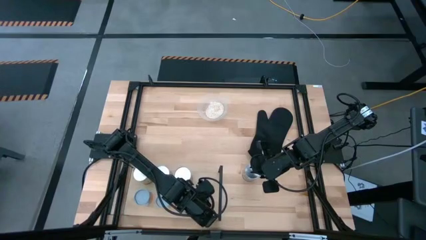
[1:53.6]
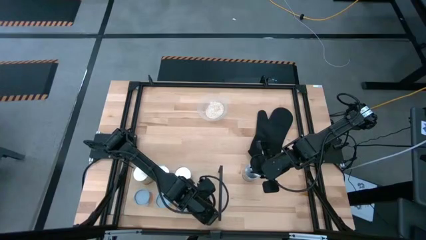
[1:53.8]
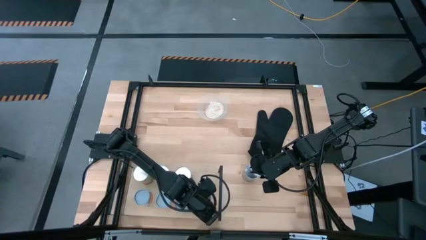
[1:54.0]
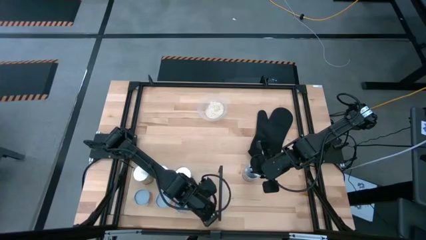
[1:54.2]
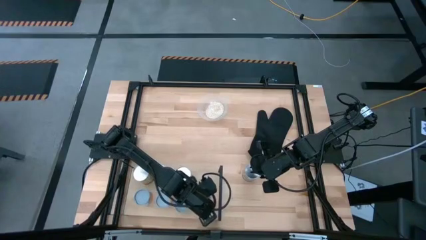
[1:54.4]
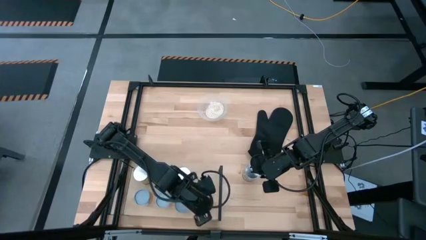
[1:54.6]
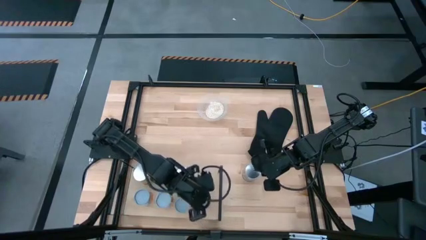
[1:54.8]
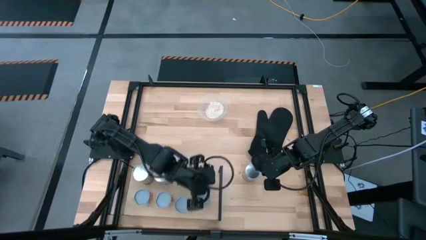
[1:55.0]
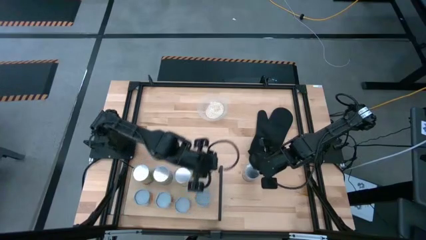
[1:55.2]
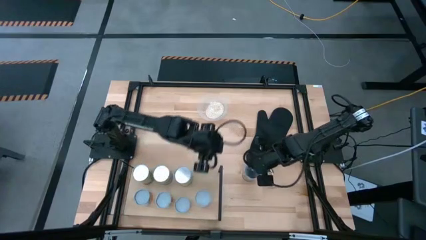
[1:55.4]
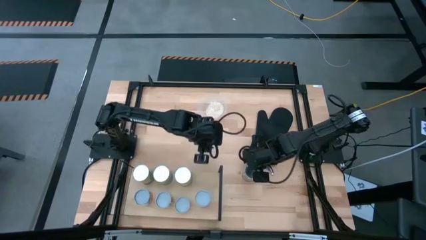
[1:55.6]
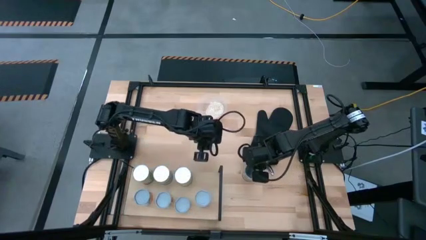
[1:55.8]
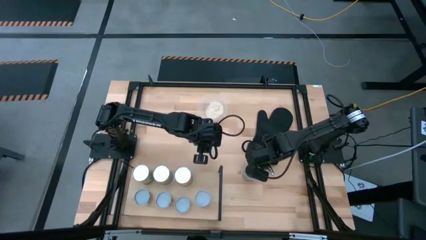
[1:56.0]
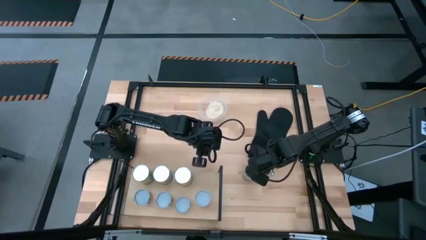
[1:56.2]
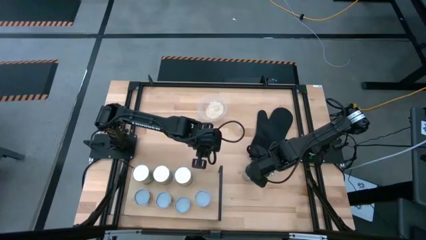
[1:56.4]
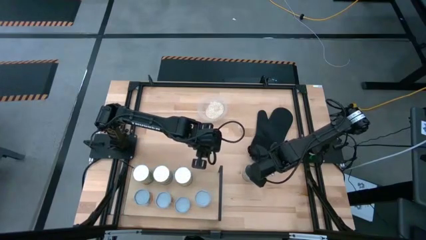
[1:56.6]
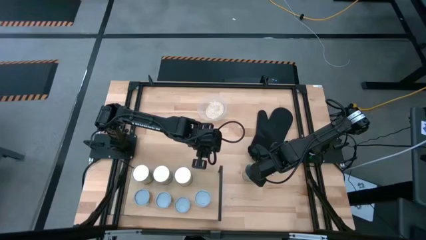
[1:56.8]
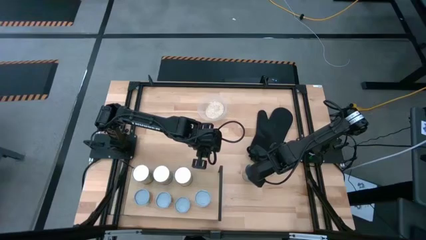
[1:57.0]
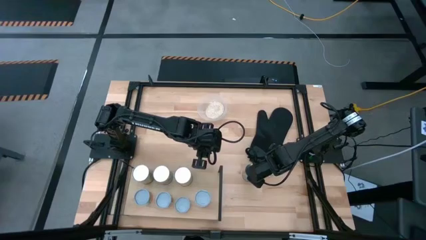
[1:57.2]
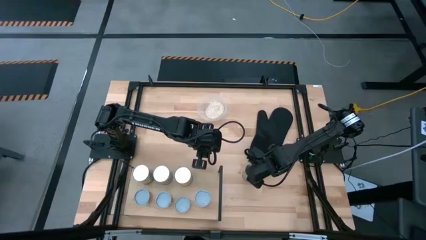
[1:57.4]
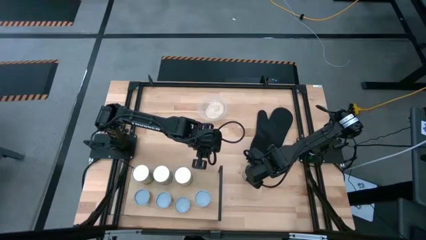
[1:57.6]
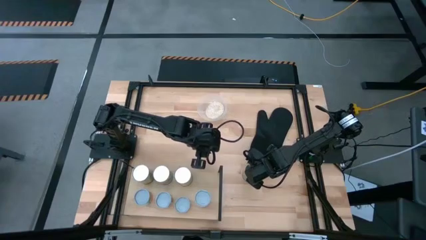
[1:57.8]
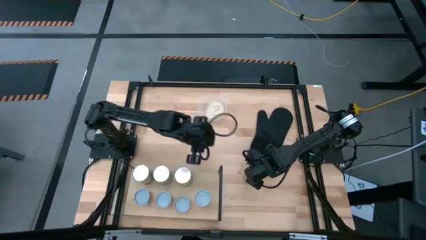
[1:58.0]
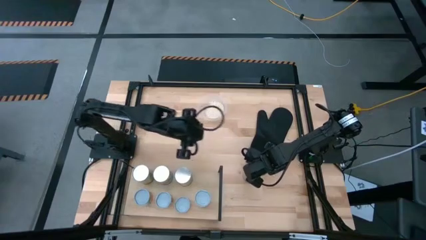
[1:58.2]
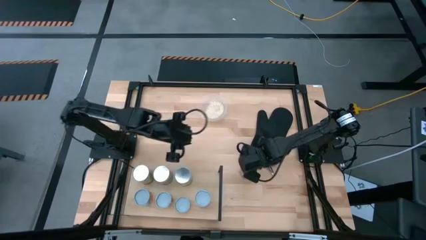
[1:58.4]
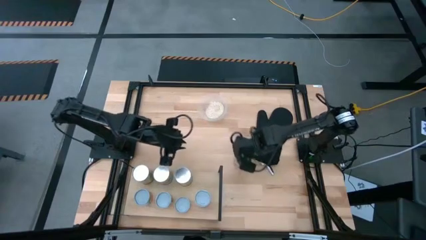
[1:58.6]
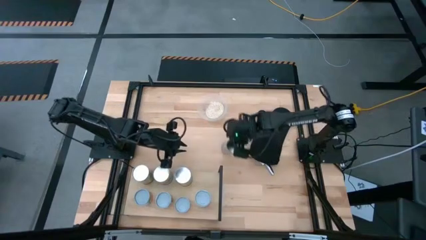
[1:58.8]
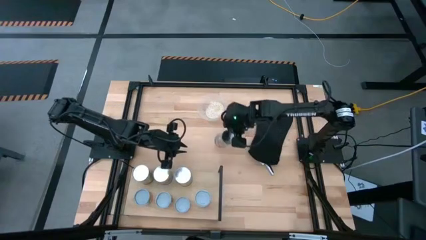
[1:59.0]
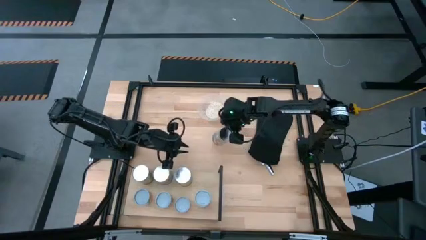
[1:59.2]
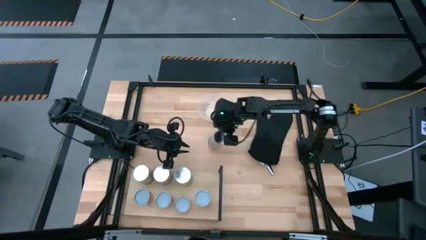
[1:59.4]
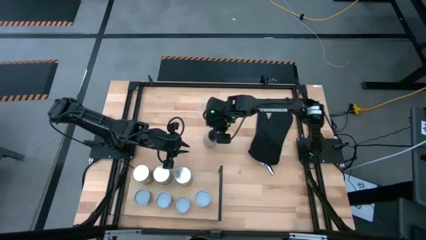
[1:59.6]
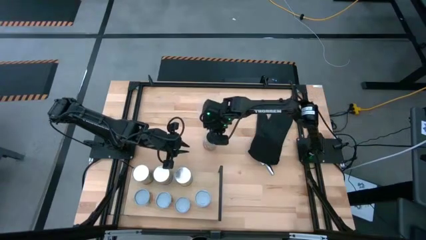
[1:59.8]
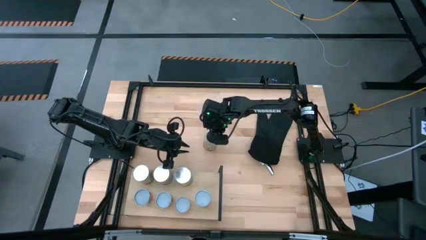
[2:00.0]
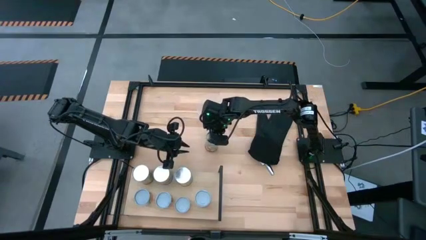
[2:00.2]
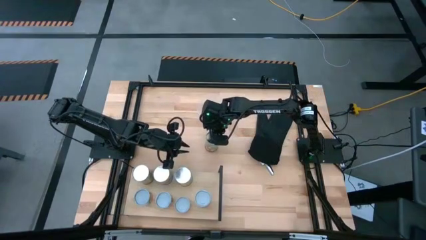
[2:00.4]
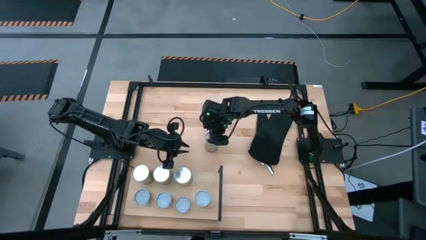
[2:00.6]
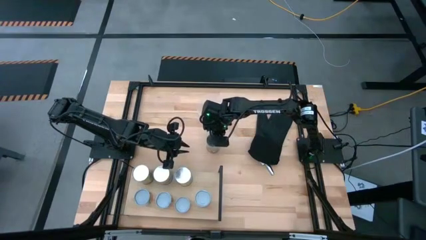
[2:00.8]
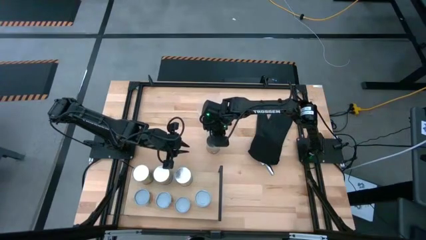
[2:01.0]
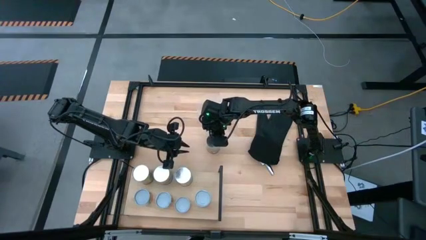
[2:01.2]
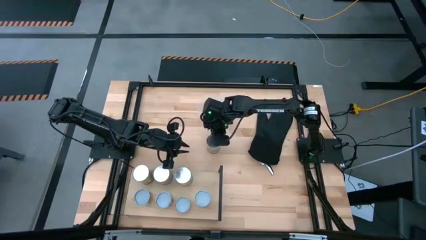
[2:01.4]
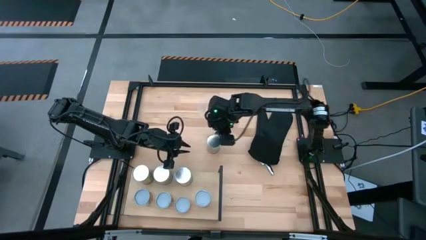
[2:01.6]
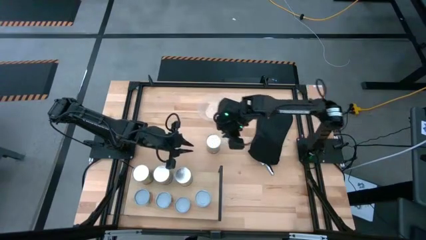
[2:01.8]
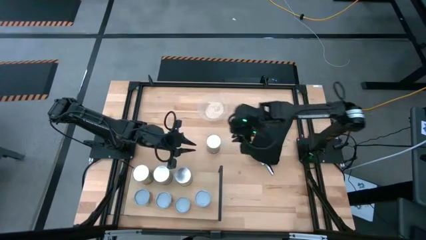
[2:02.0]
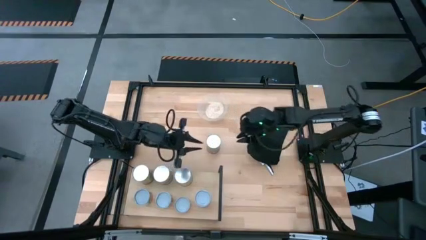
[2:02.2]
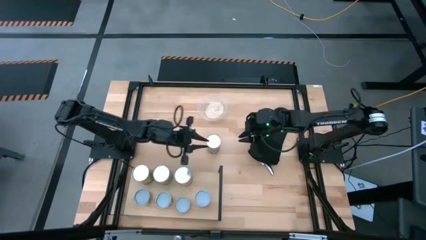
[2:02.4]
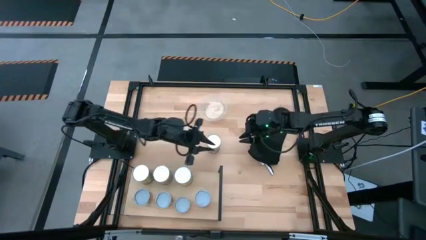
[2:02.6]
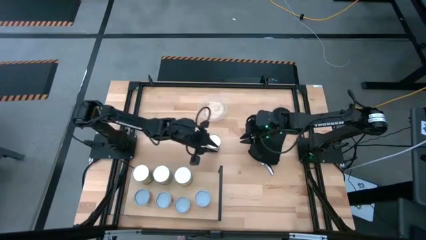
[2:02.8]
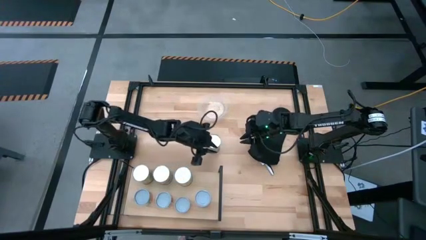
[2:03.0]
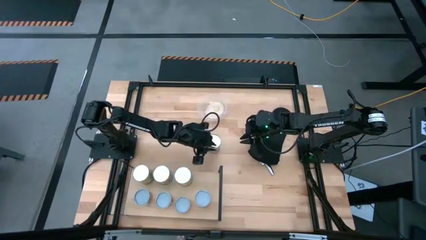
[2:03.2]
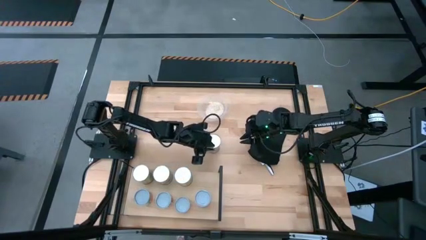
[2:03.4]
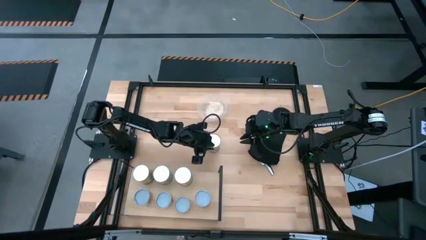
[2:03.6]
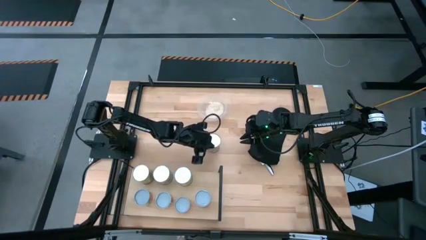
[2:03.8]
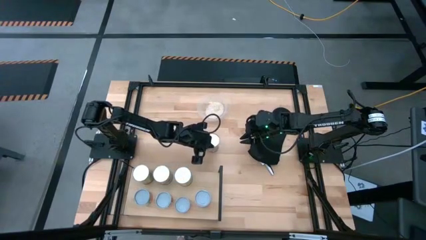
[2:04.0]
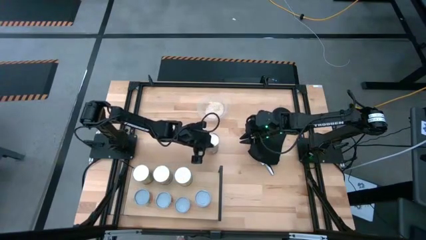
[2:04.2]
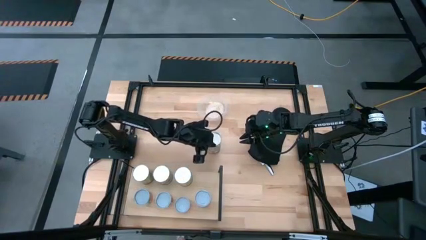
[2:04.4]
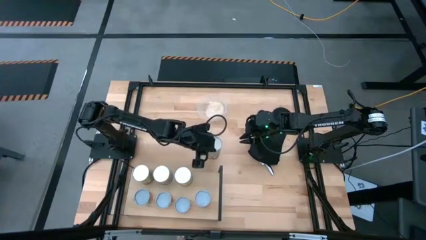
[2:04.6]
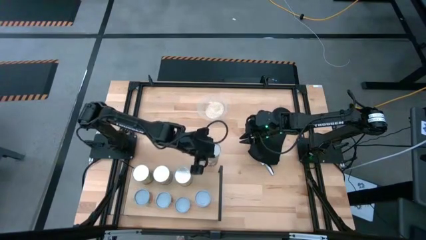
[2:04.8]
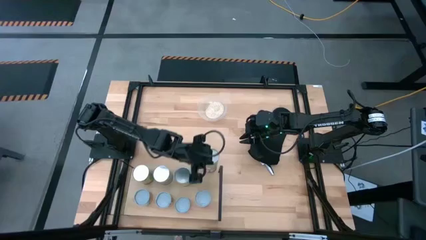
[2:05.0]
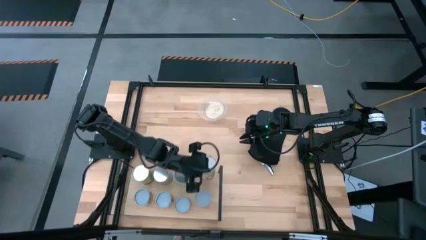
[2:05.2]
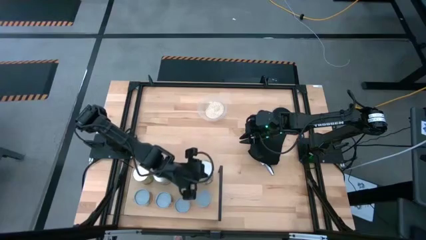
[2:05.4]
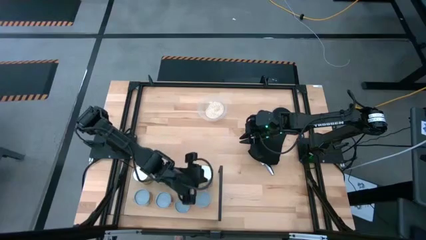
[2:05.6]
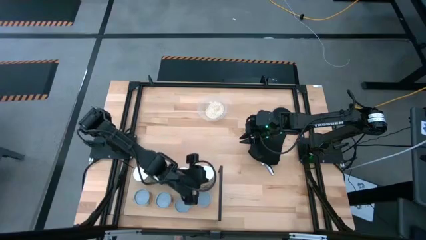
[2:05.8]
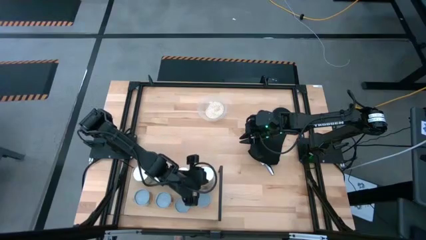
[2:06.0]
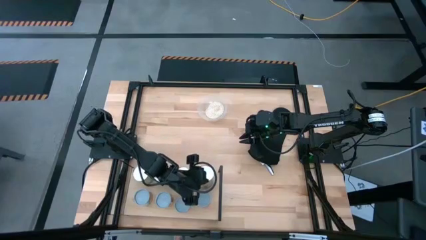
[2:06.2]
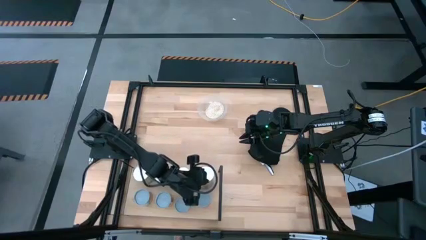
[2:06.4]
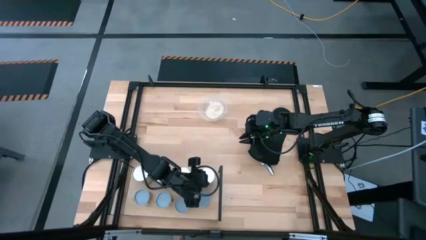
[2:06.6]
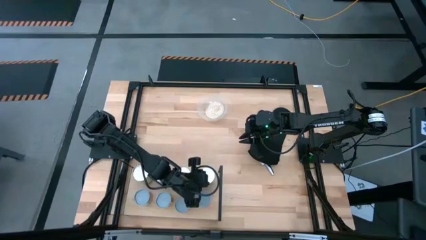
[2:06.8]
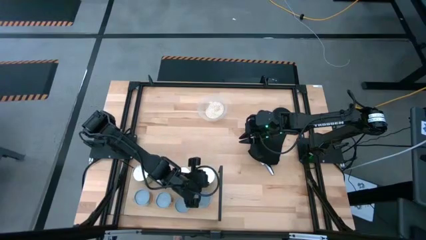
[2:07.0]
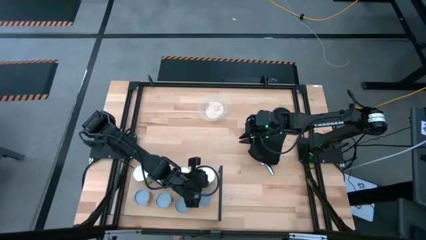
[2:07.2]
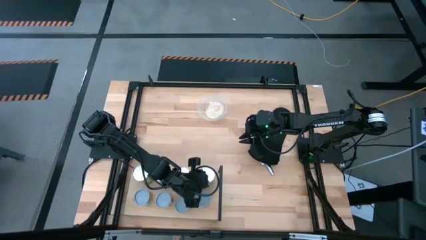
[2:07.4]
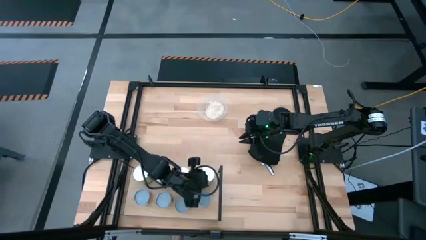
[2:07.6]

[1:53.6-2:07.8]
Task: Pick and place cans onto a shelf
Put the yellow canned peach on the shelf aligned with the other white canned mixed fruit
